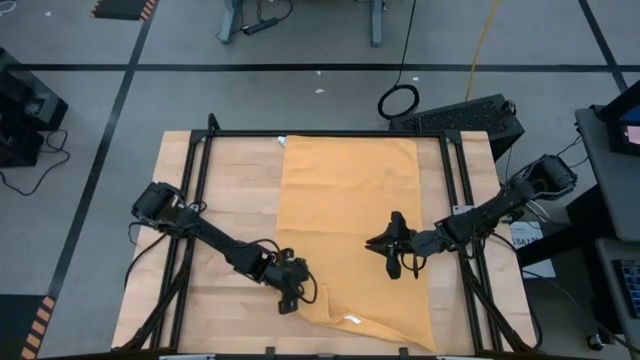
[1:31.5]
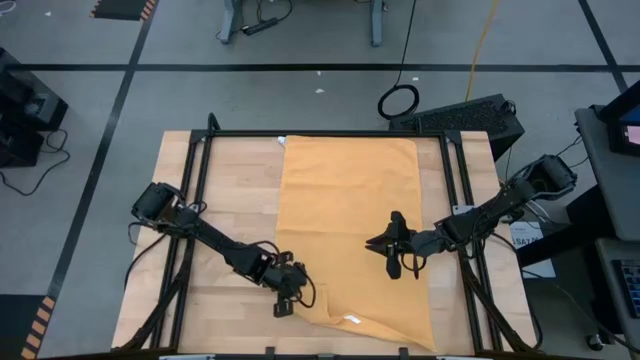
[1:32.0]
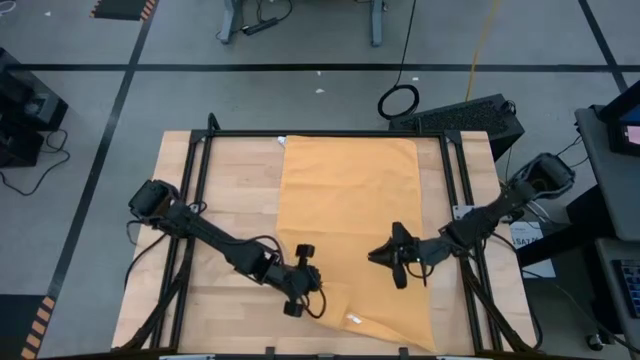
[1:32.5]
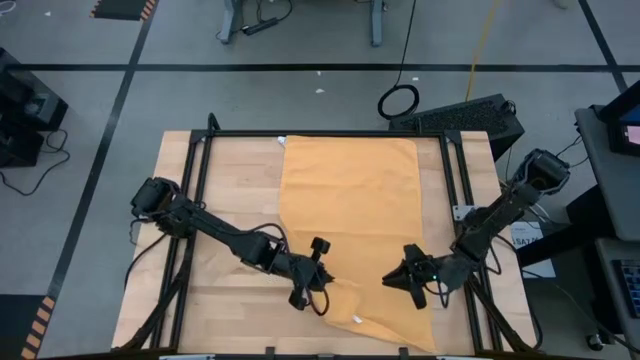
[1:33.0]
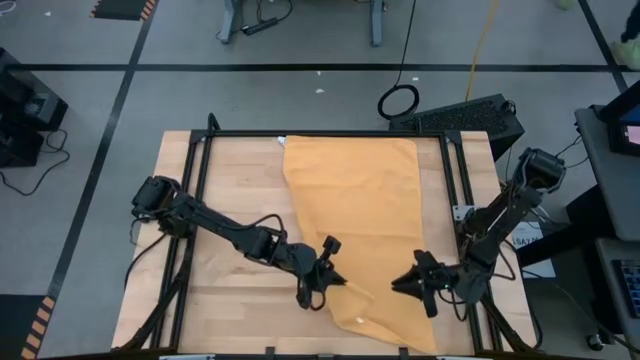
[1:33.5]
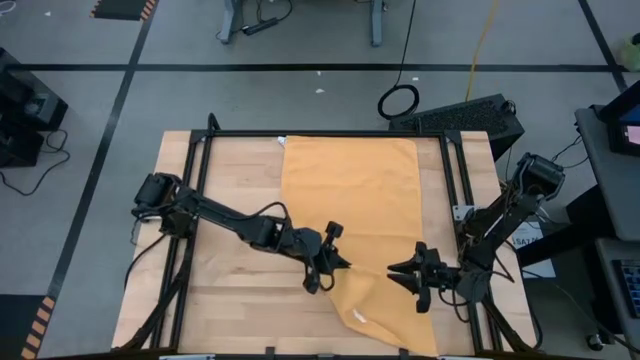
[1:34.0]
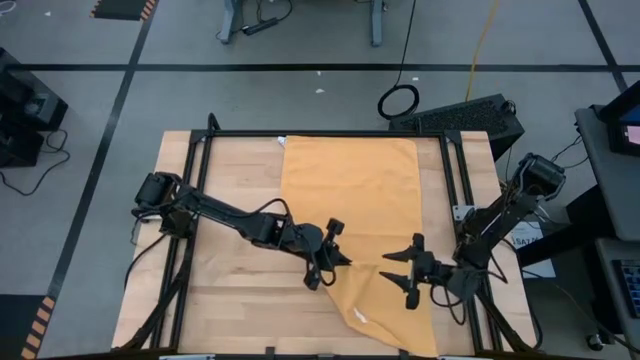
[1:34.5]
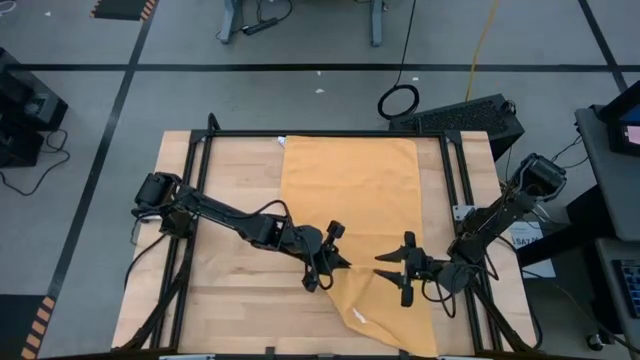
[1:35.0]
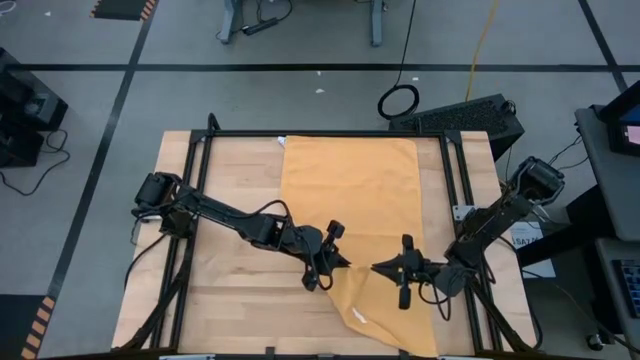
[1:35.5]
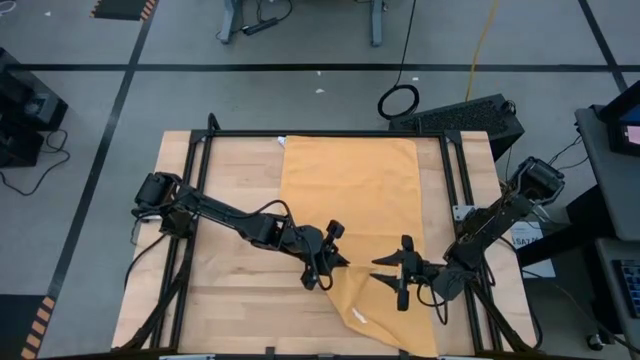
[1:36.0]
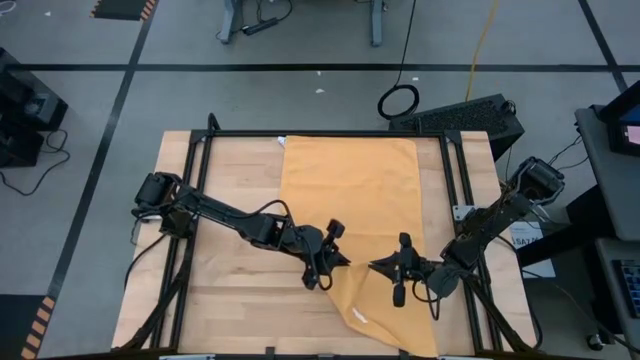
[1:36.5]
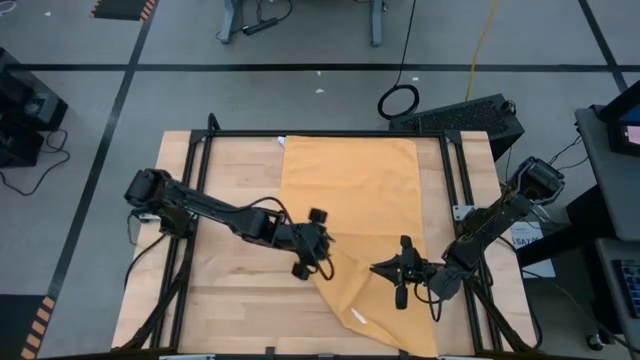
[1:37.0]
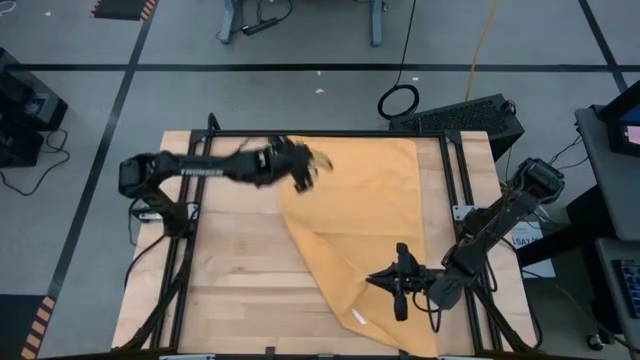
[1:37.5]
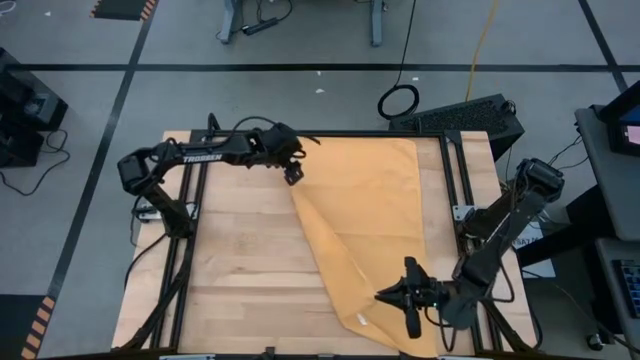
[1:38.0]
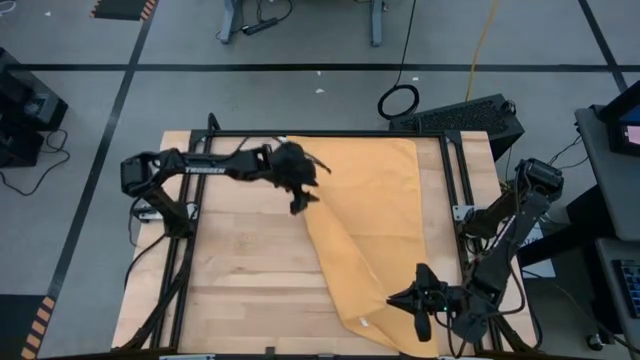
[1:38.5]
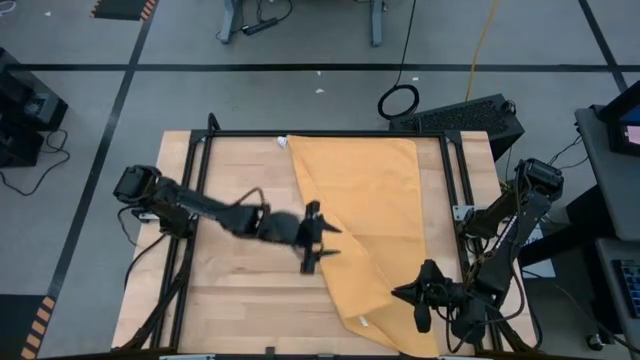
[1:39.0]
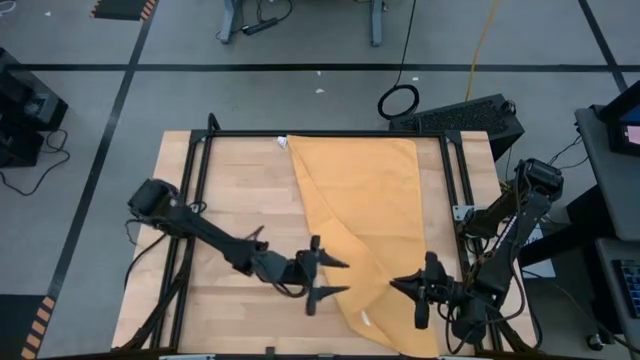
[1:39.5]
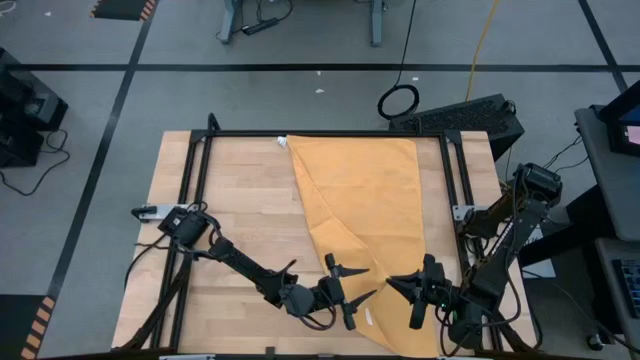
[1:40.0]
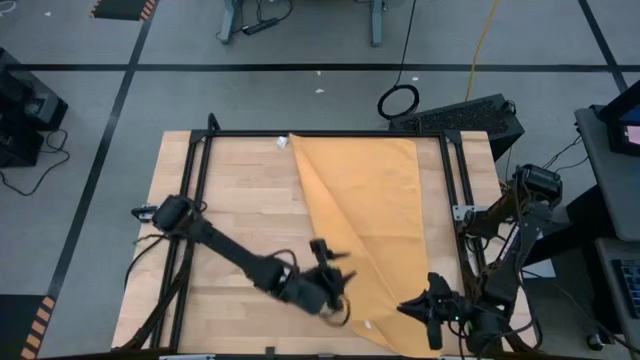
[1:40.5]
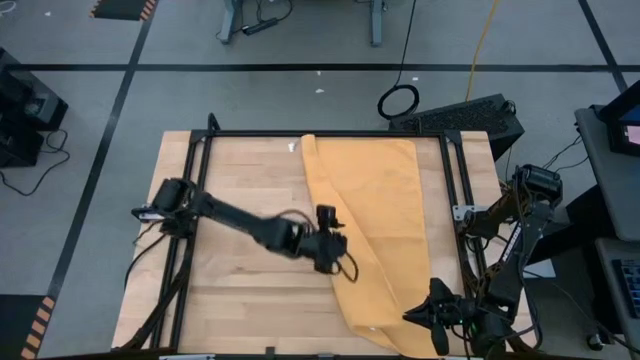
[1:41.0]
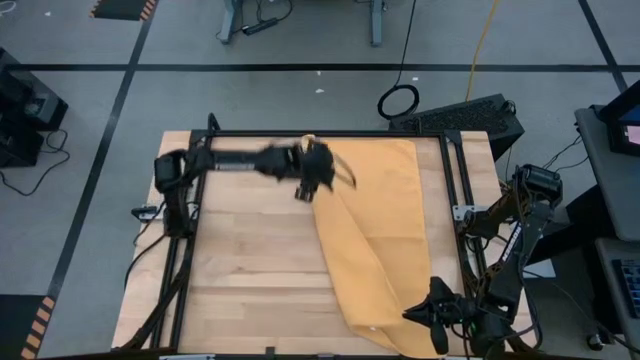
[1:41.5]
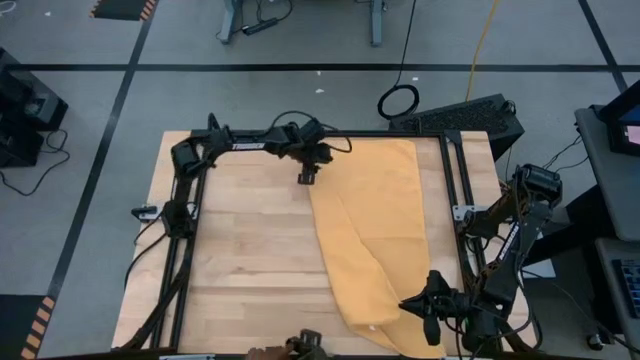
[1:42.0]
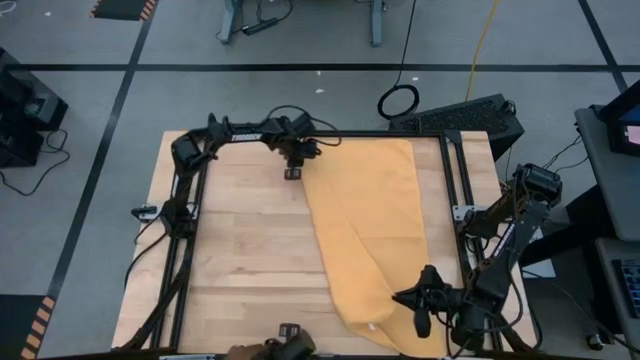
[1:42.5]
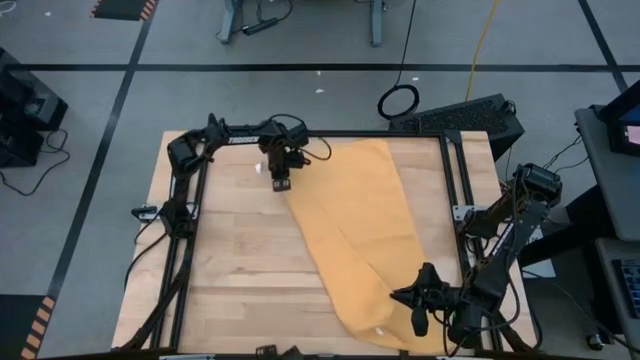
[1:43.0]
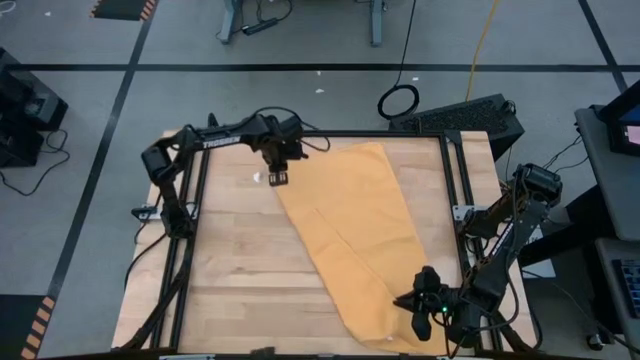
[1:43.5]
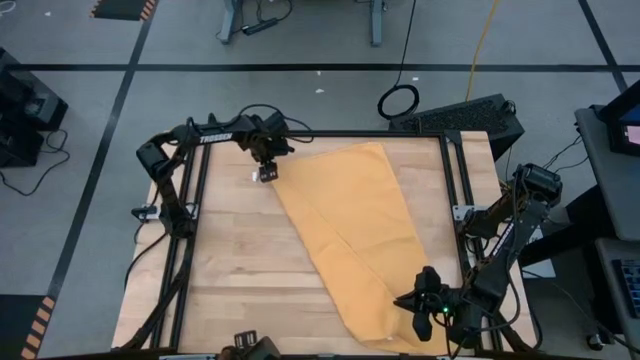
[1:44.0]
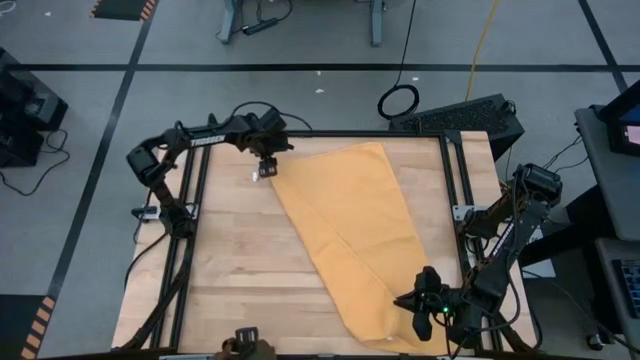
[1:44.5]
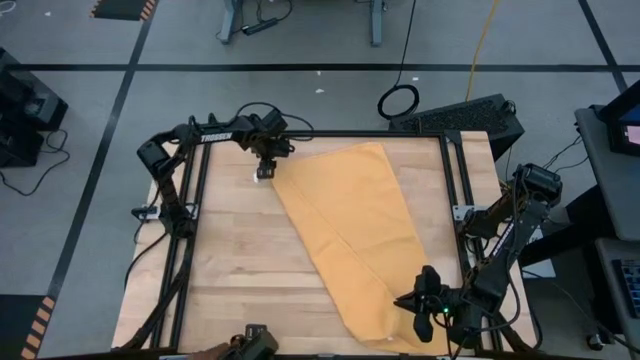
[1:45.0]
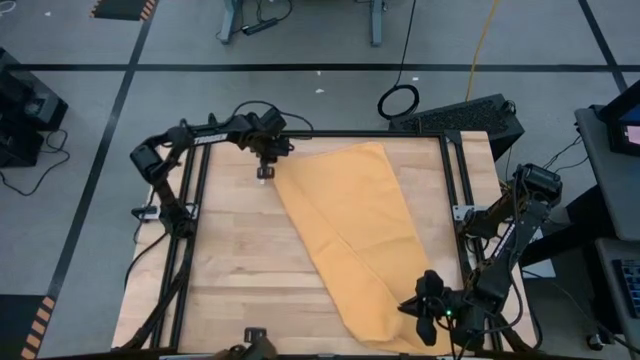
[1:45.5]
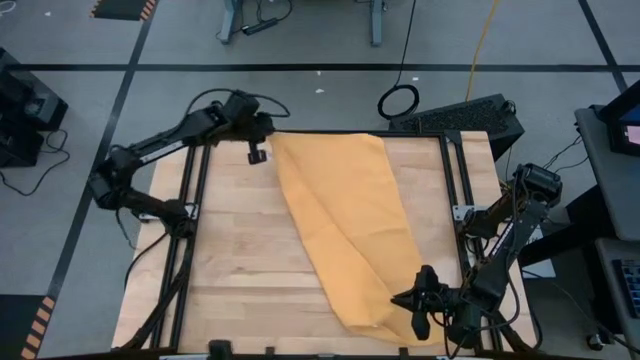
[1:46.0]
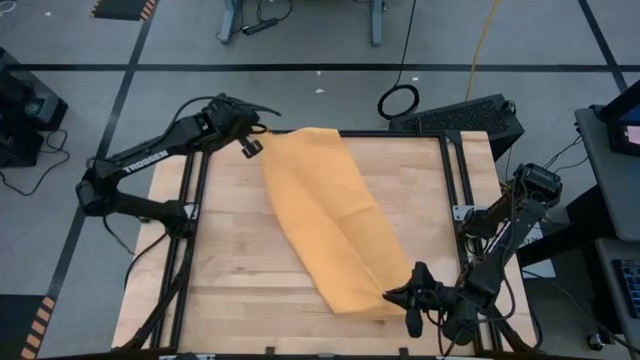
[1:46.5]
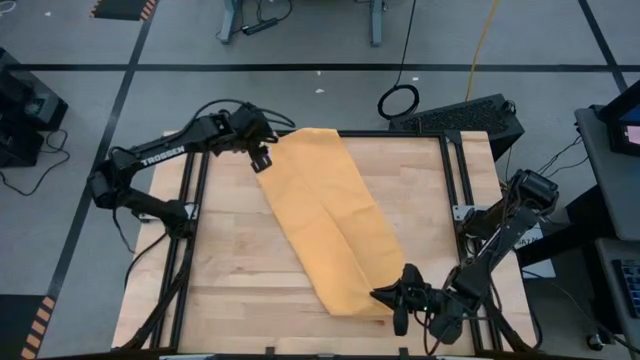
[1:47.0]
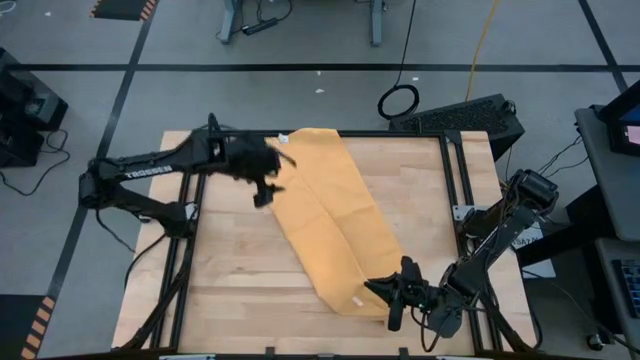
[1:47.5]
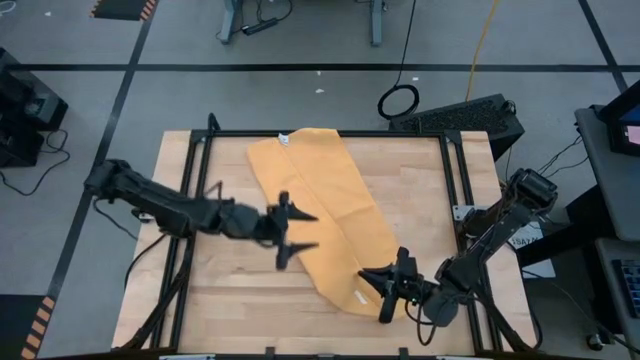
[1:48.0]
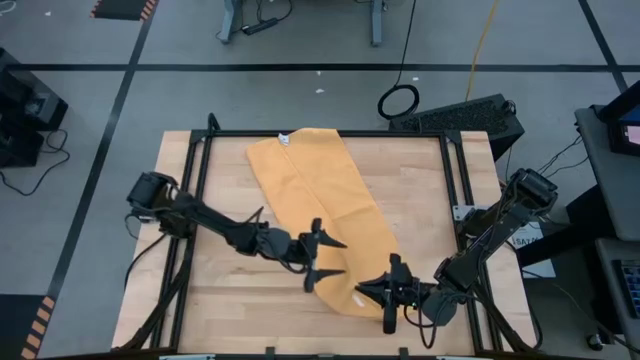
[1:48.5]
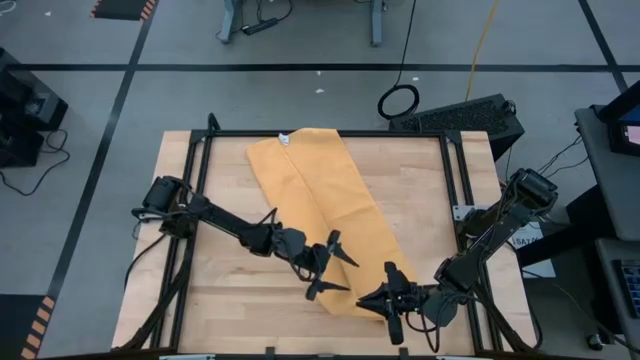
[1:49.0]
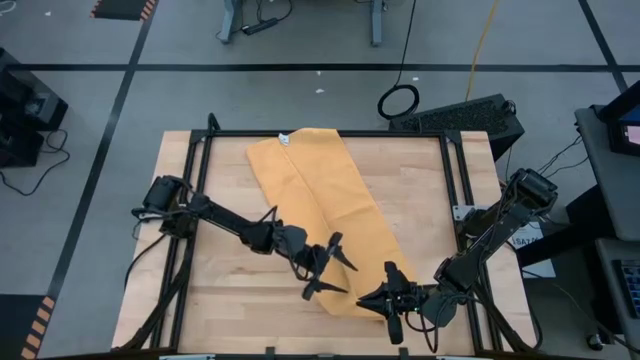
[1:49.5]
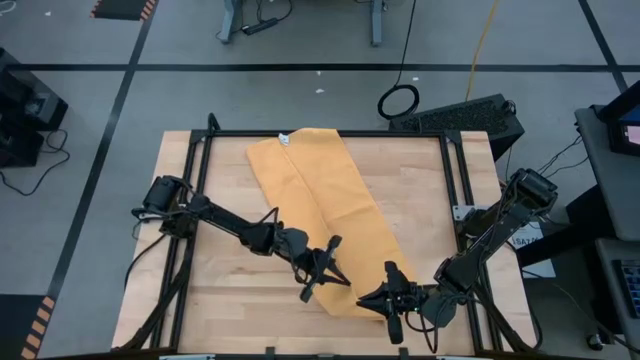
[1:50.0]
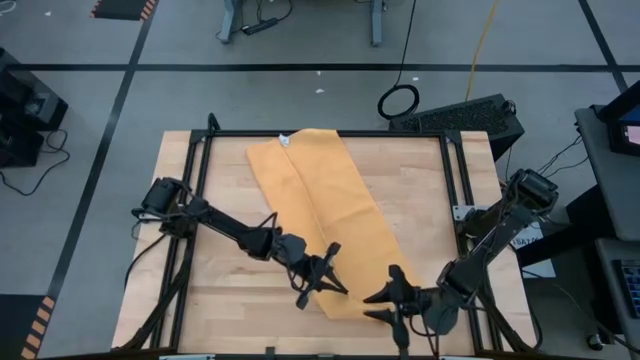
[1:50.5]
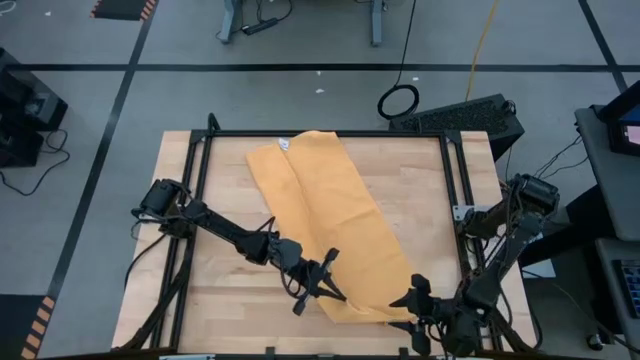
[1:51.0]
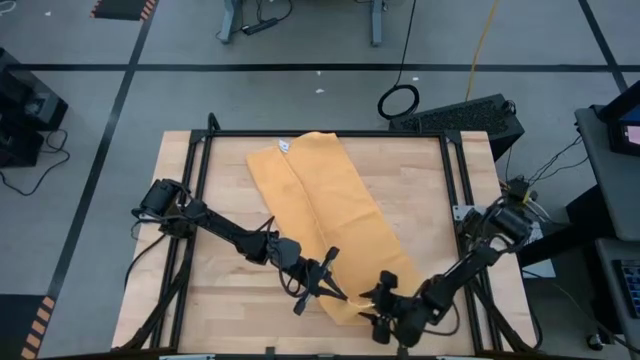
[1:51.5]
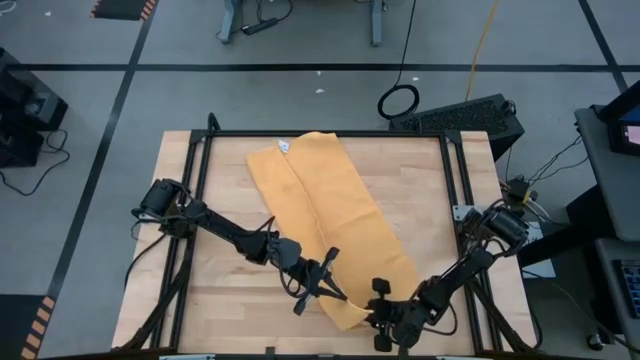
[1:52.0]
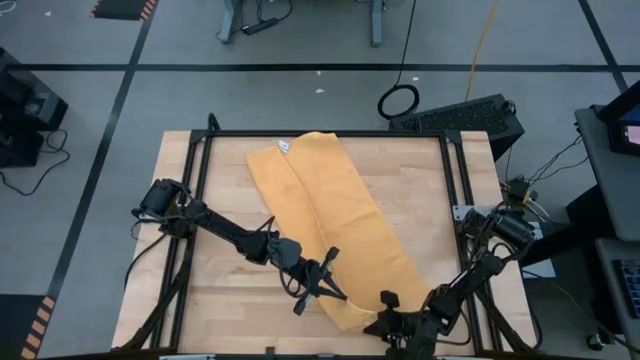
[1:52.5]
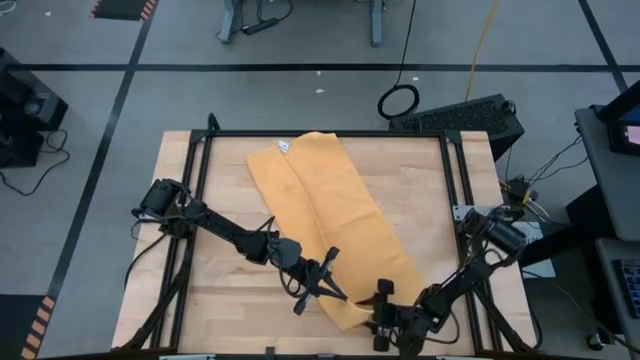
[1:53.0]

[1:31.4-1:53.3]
Task: Roll towel
Fold the yellow towel
